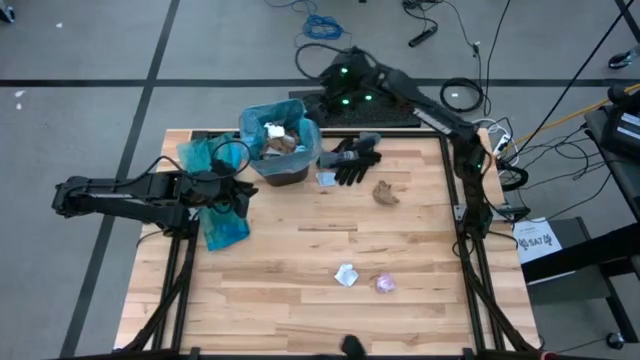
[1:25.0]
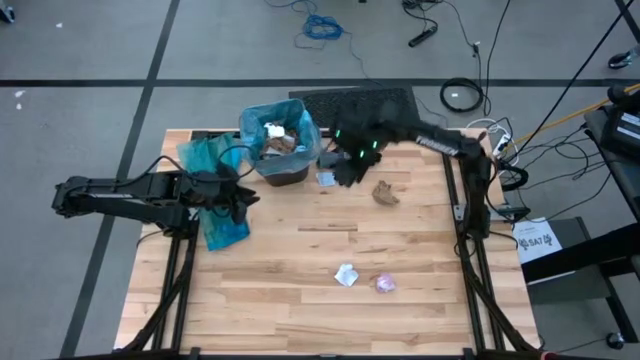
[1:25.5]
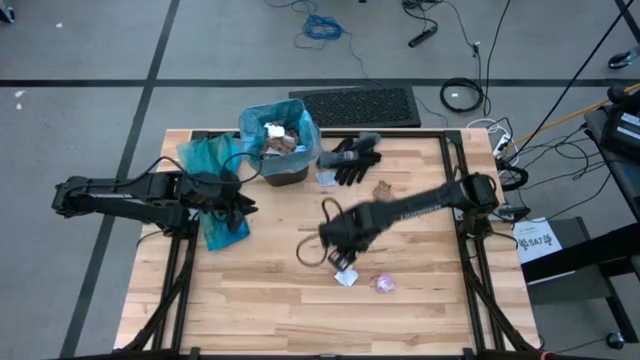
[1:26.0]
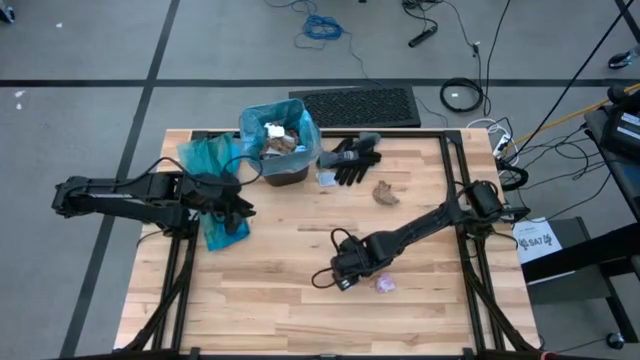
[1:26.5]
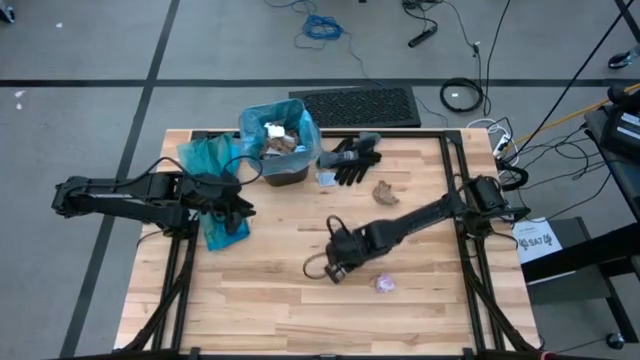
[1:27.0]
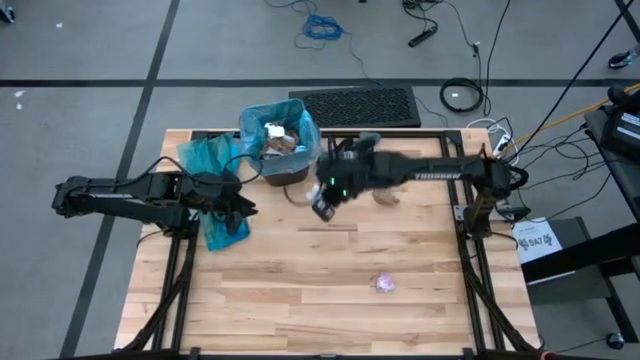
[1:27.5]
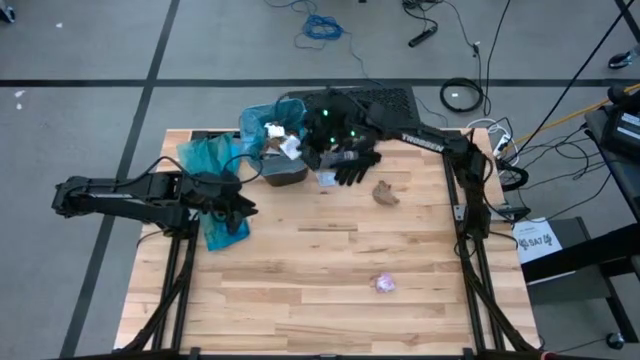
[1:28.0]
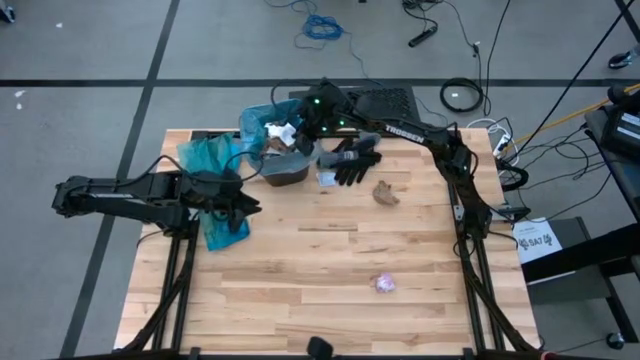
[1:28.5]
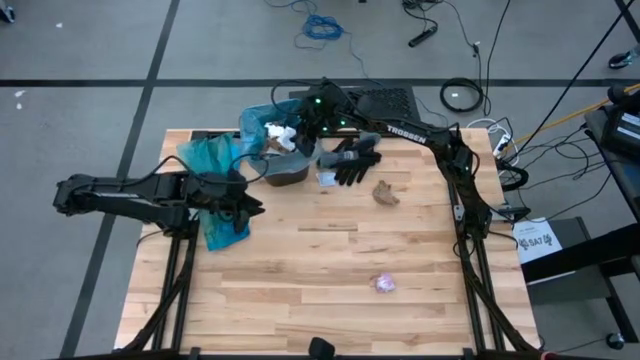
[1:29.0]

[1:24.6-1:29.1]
Task: place trash/remove bag and relplace
Put the white cardboard into the trash bin

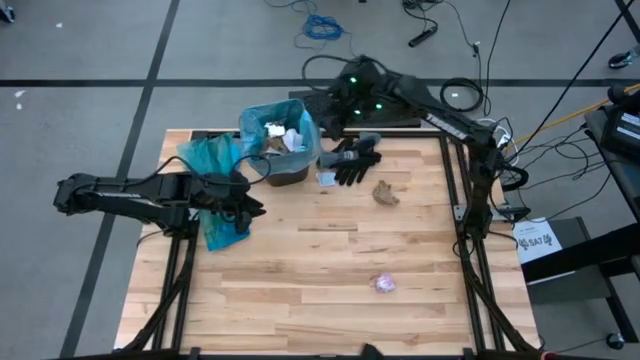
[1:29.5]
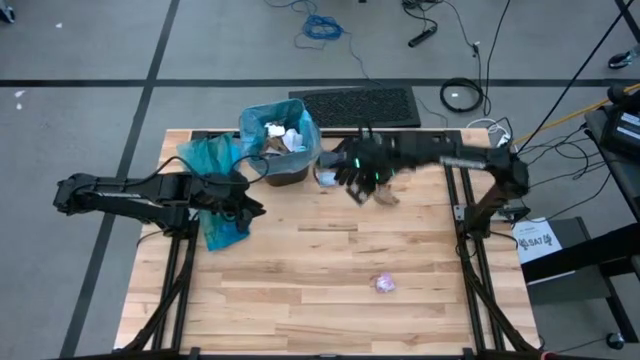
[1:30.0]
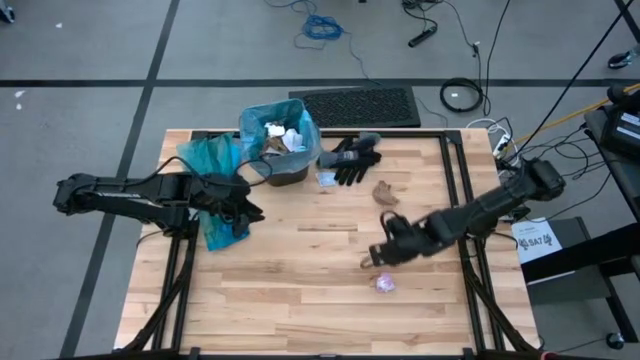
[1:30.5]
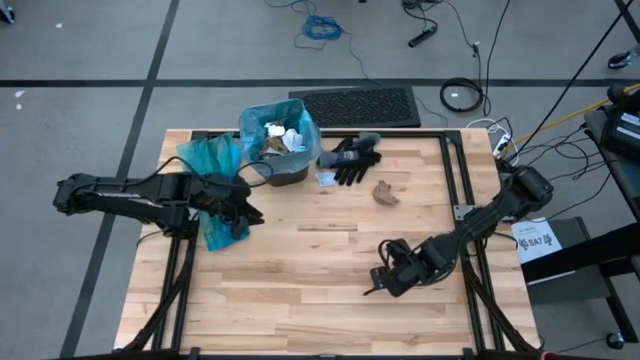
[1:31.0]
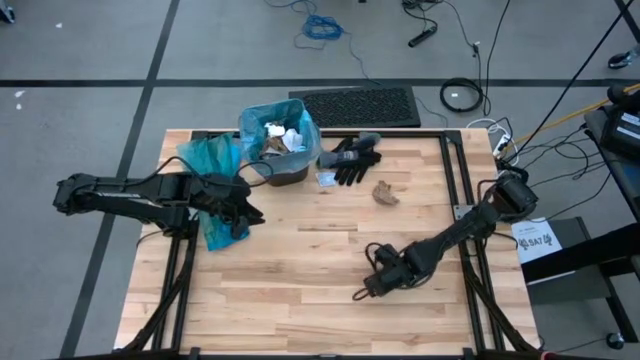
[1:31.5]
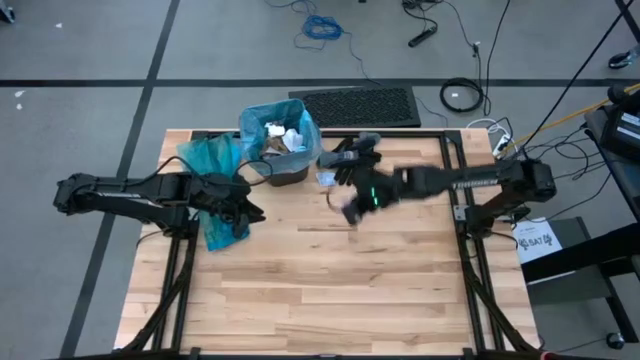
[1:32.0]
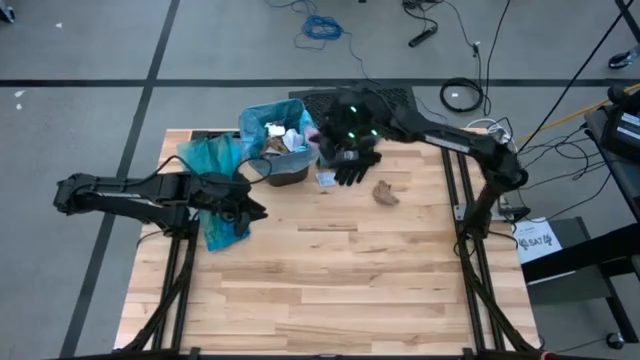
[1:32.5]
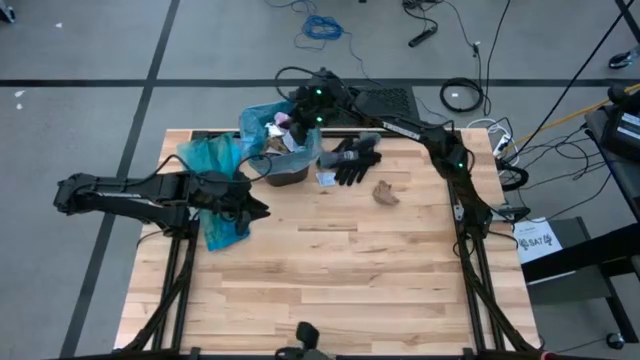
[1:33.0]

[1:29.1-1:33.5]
Put the pink plastic into the trash bin

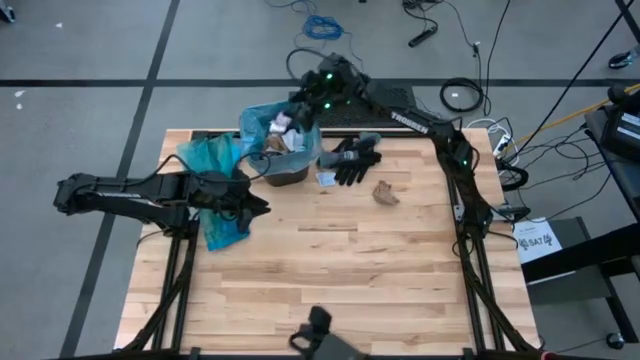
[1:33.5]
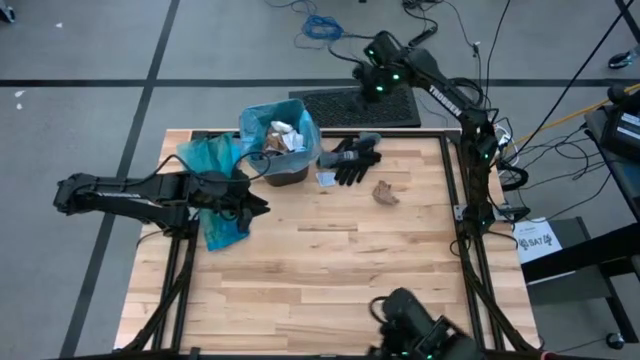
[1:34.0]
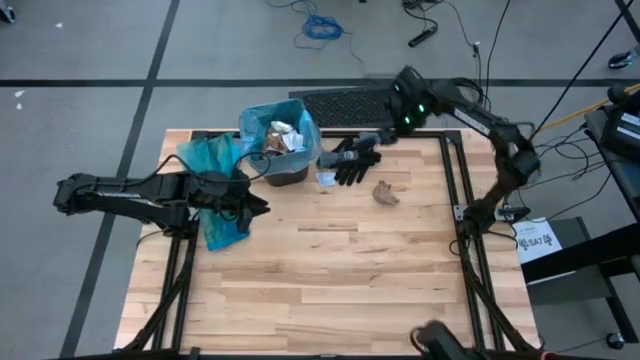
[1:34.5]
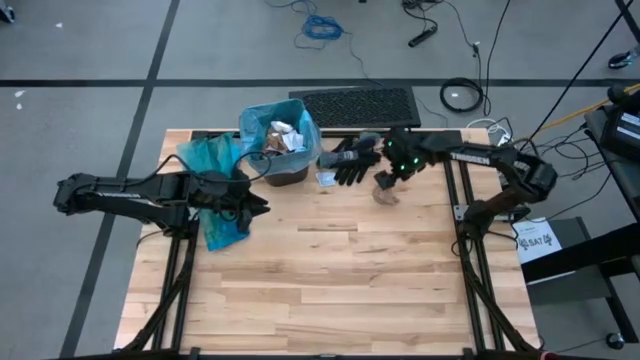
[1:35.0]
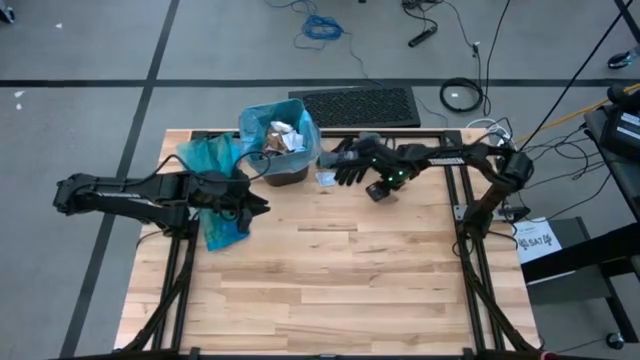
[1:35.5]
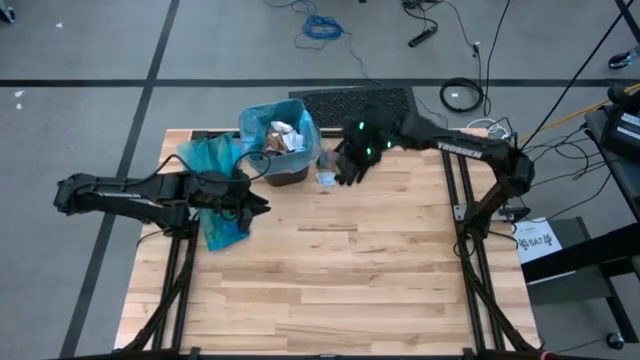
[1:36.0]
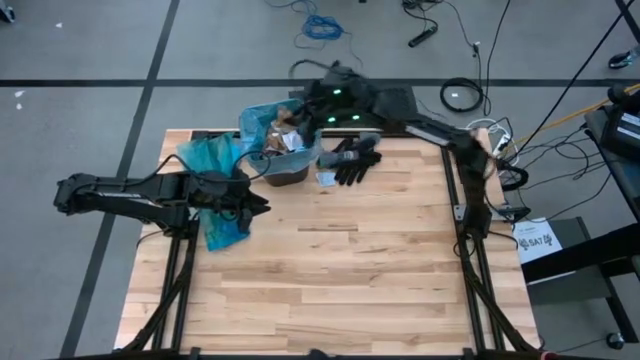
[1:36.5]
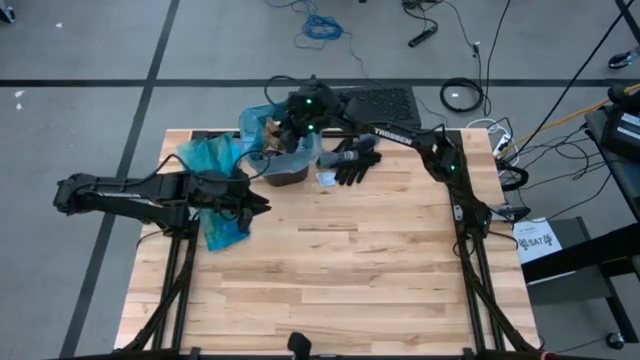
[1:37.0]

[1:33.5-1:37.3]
Put the brown napkin into the trash bin

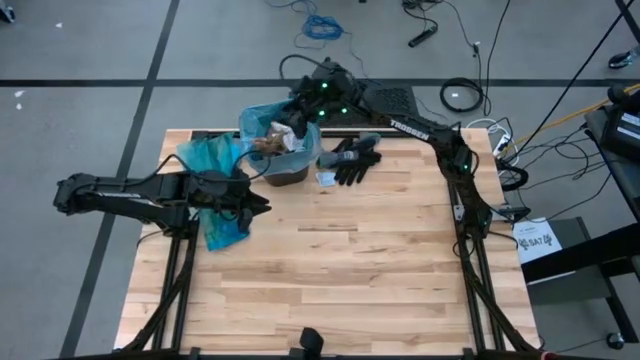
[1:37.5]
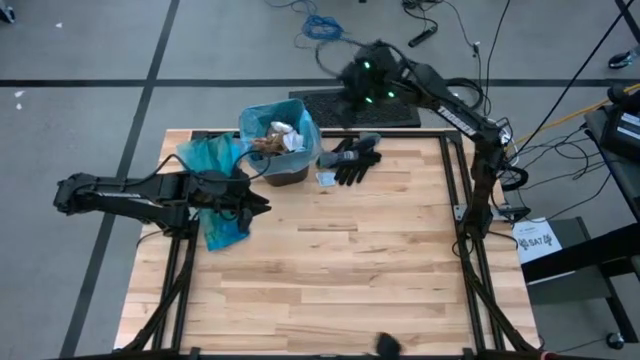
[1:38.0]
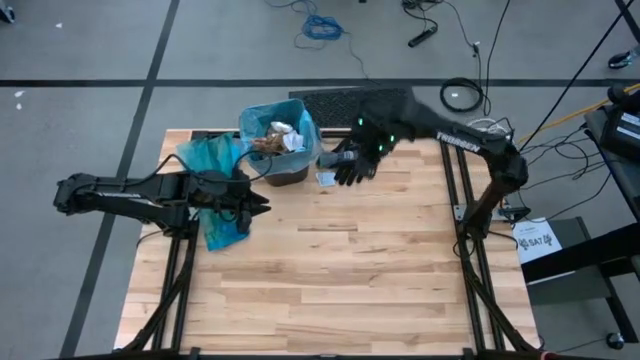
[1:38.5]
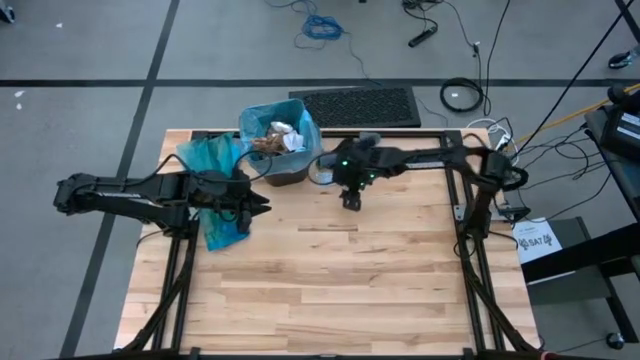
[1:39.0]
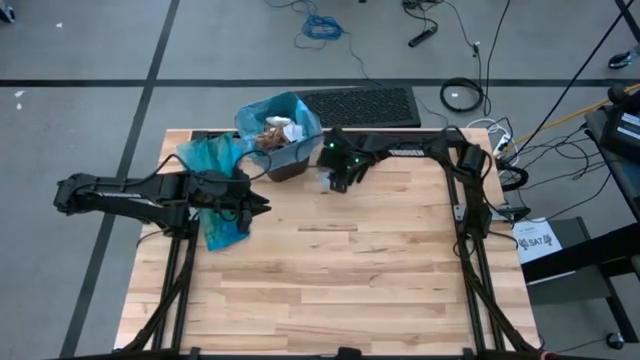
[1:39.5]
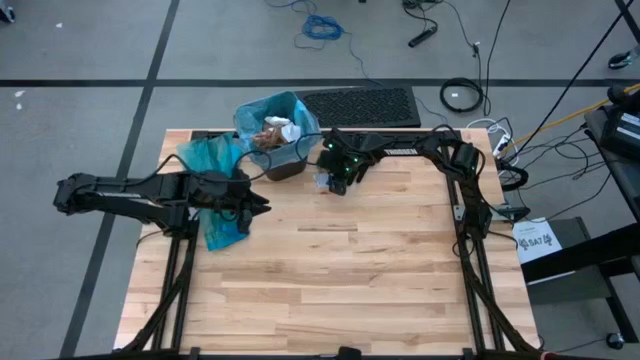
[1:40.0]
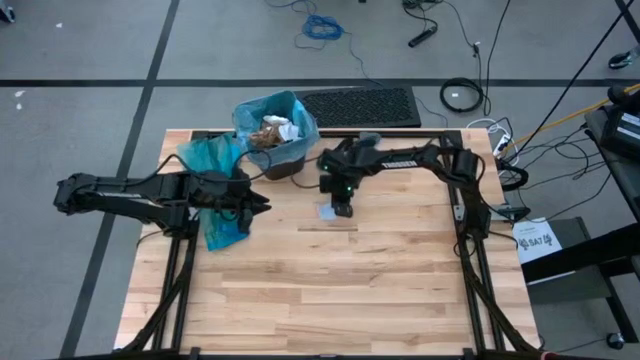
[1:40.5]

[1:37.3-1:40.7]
Put the white cardboard into the trash bin

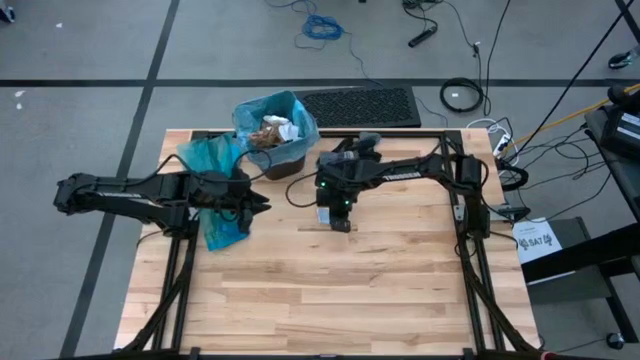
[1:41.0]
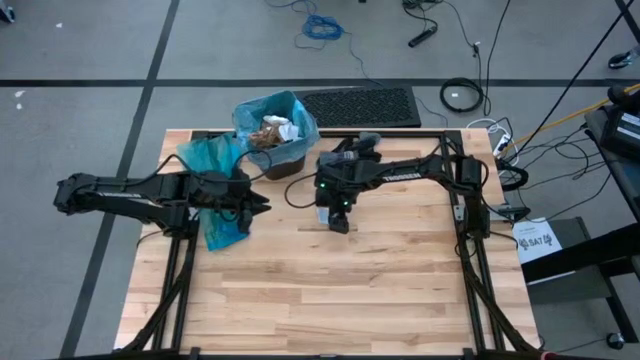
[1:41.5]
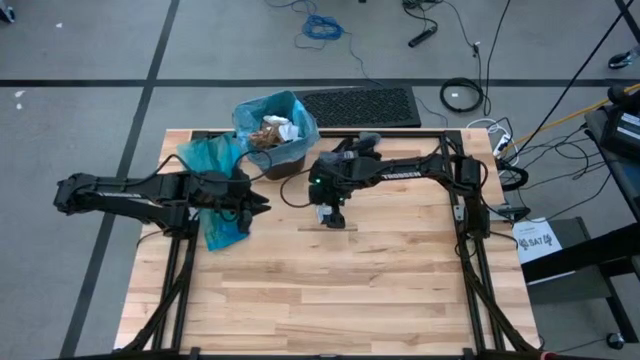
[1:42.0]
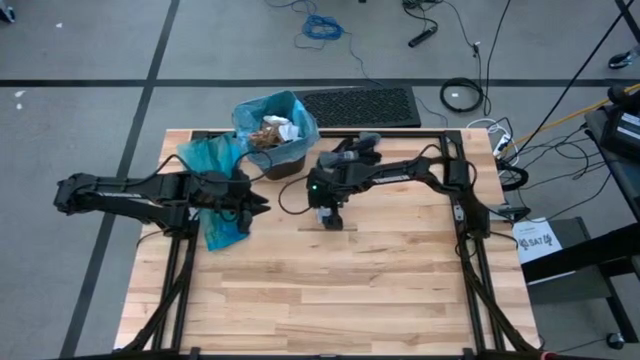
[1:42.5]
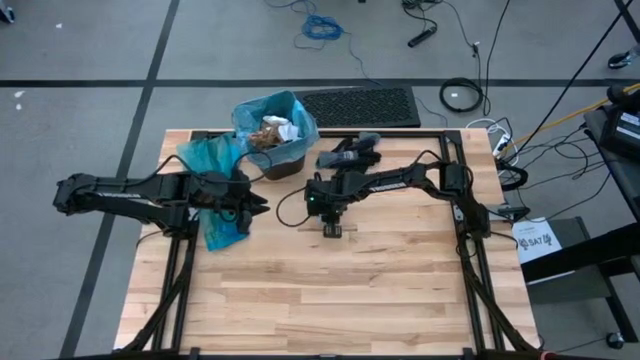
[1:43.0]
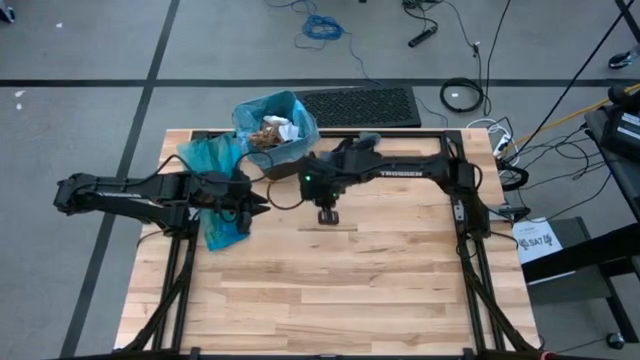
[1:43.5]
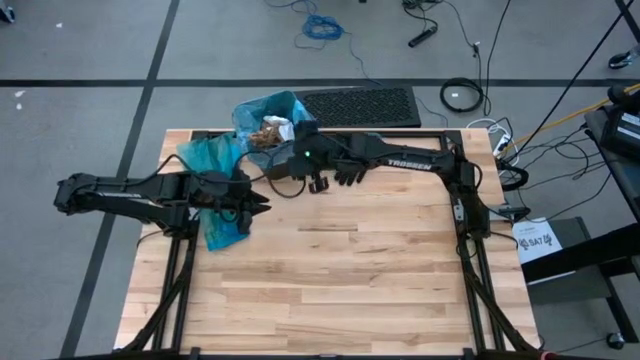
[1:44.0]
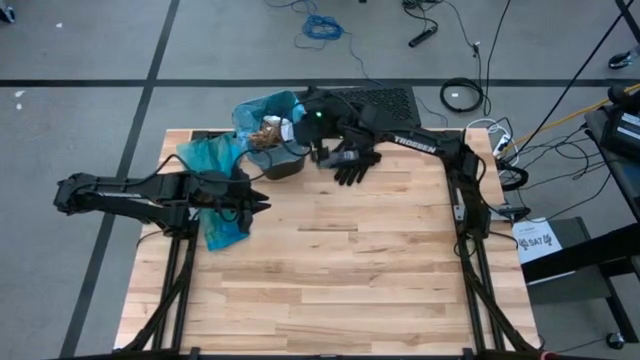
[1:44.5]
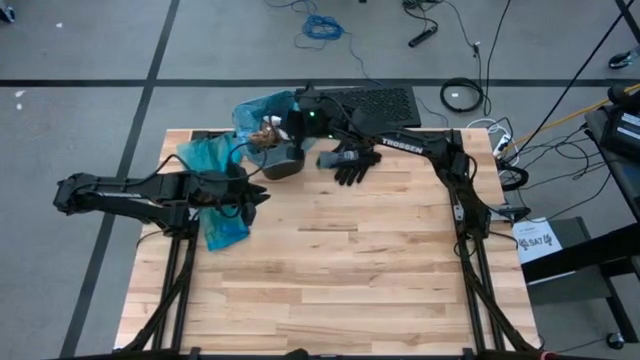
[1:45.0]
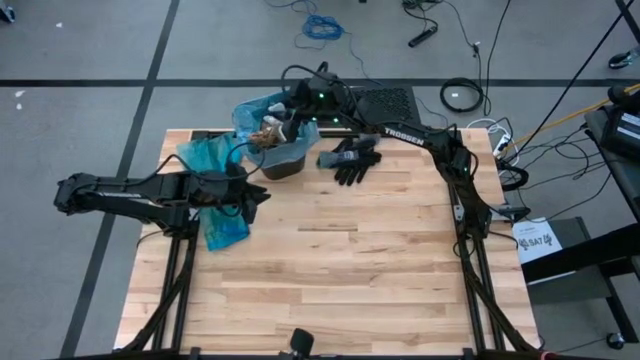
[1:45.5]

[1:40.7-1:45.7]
Put the white cardboard into the trash bin
